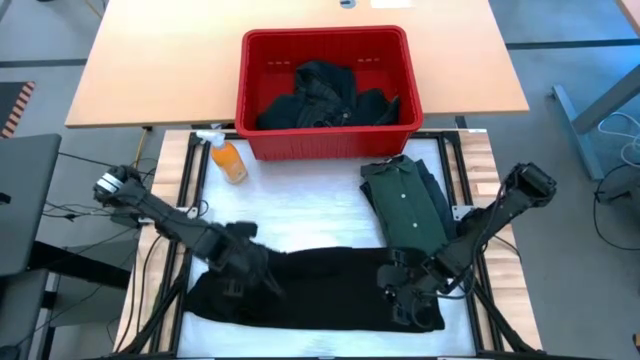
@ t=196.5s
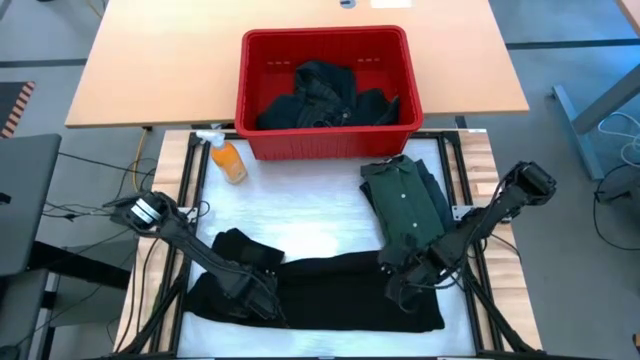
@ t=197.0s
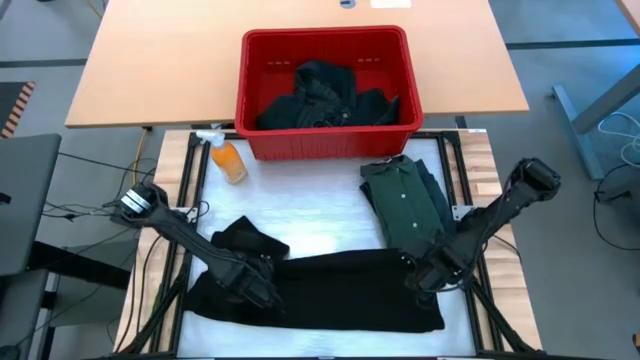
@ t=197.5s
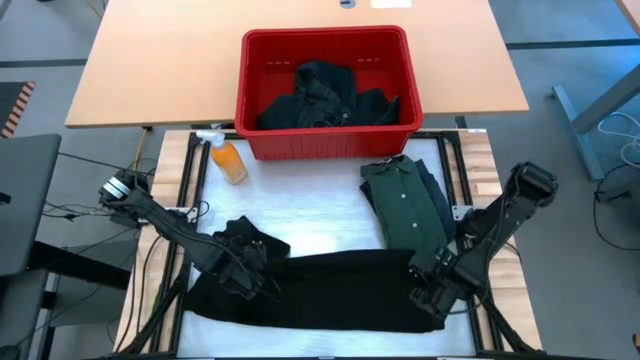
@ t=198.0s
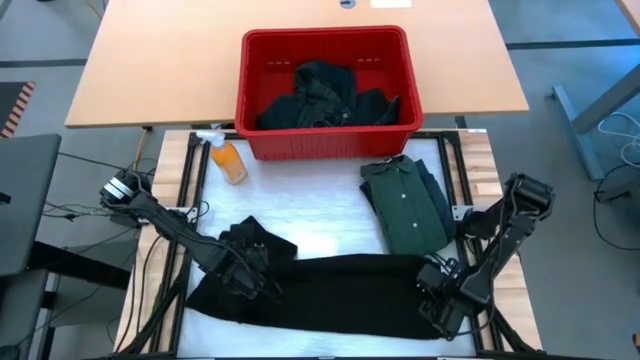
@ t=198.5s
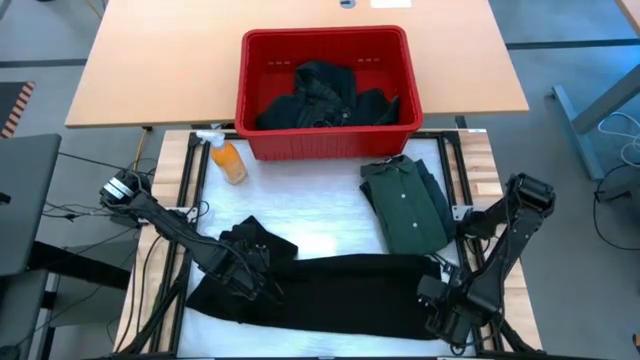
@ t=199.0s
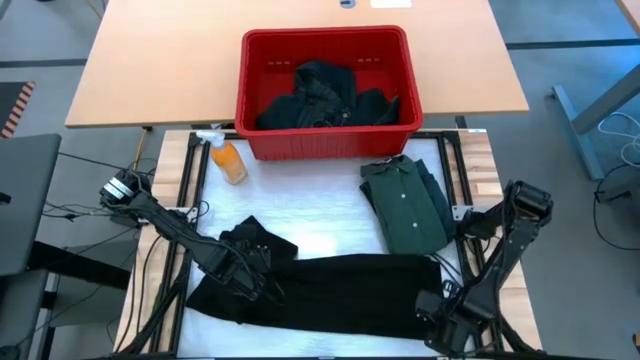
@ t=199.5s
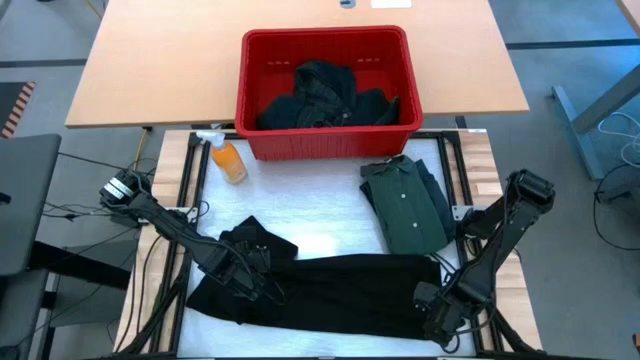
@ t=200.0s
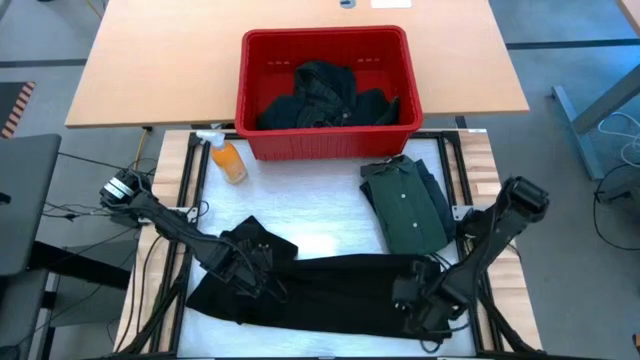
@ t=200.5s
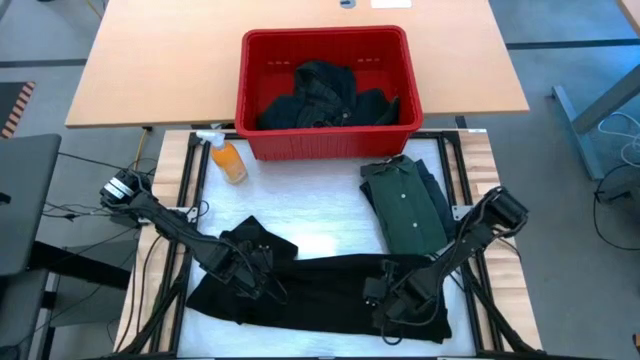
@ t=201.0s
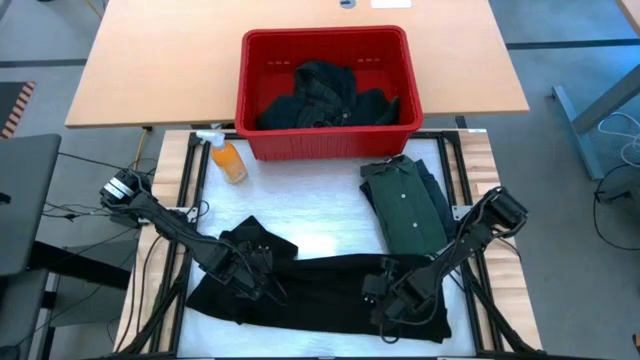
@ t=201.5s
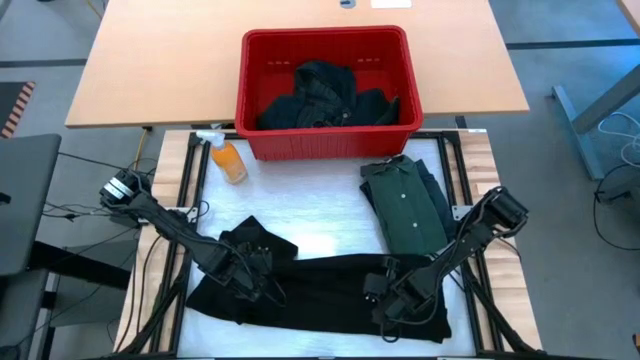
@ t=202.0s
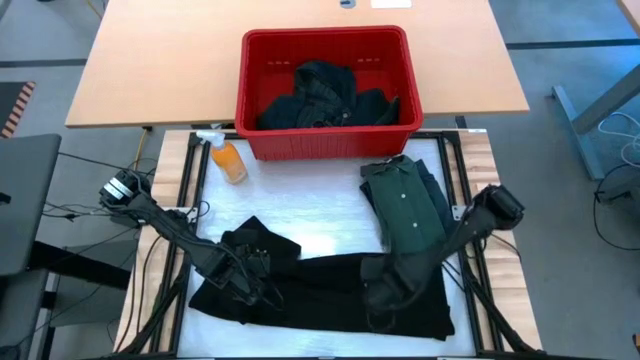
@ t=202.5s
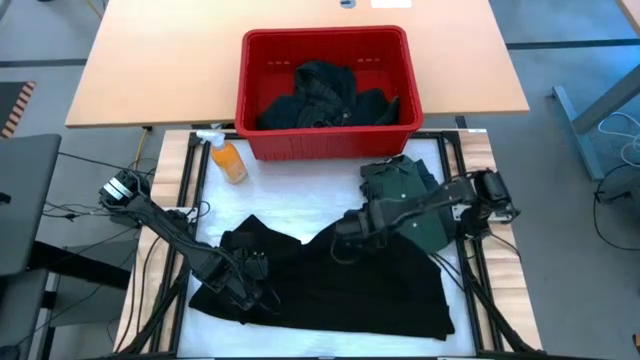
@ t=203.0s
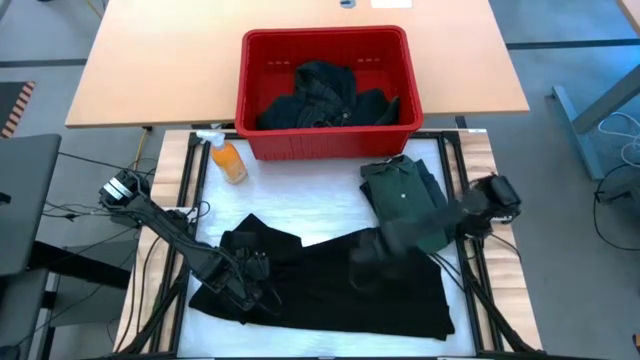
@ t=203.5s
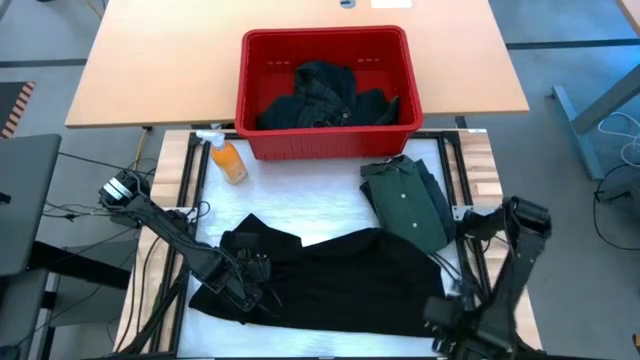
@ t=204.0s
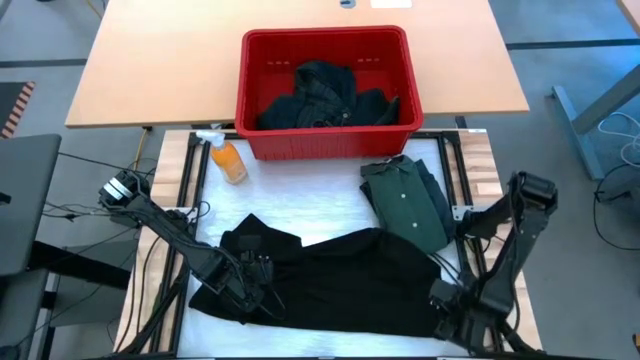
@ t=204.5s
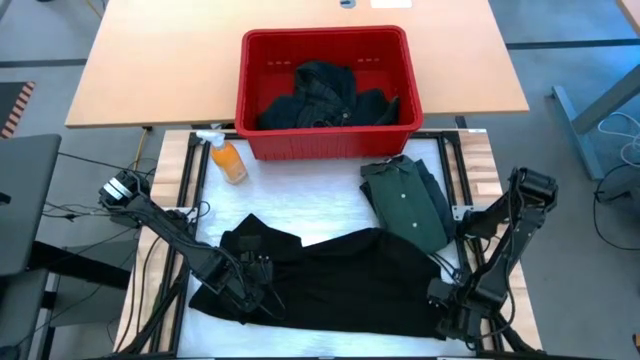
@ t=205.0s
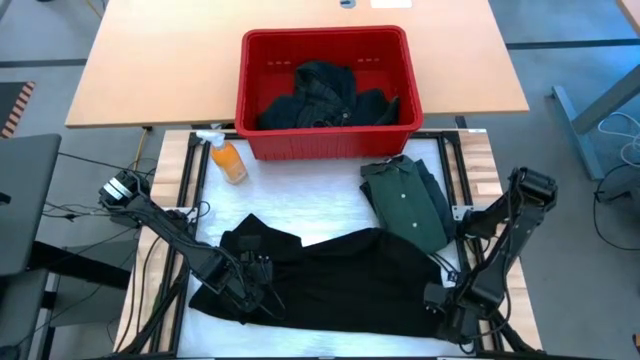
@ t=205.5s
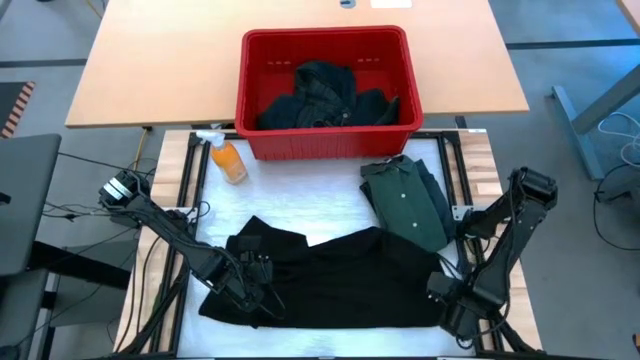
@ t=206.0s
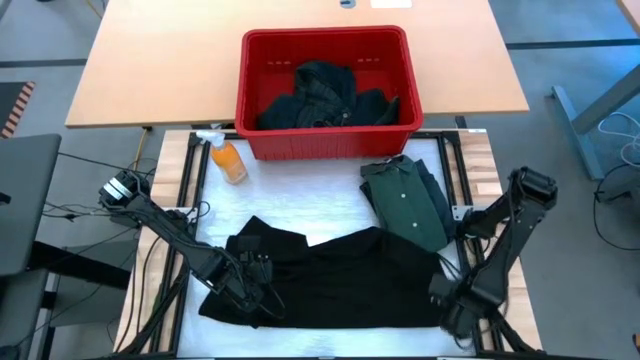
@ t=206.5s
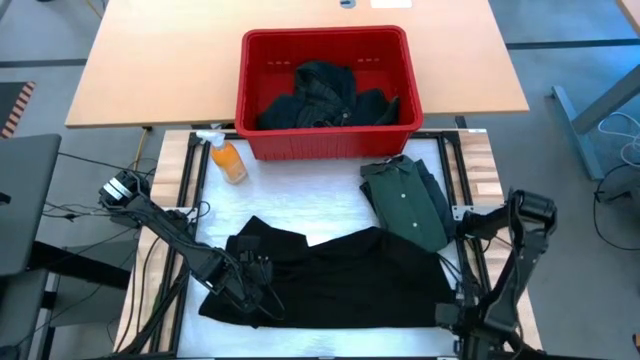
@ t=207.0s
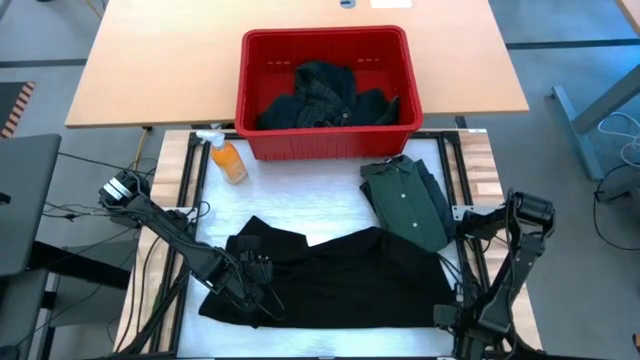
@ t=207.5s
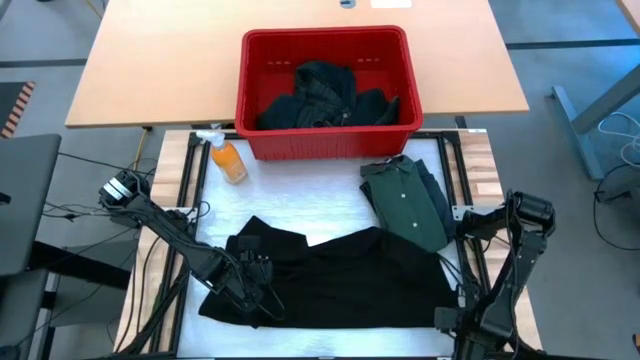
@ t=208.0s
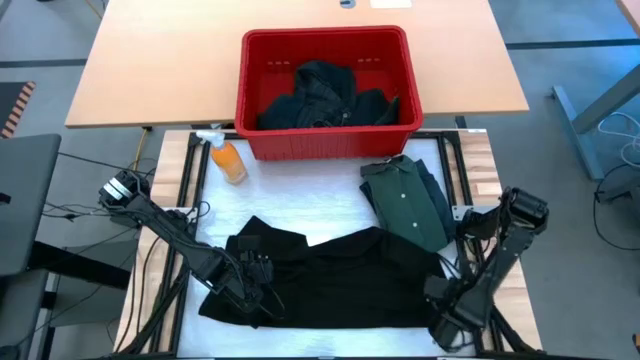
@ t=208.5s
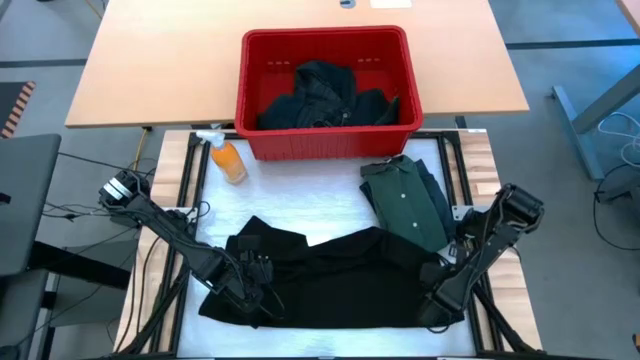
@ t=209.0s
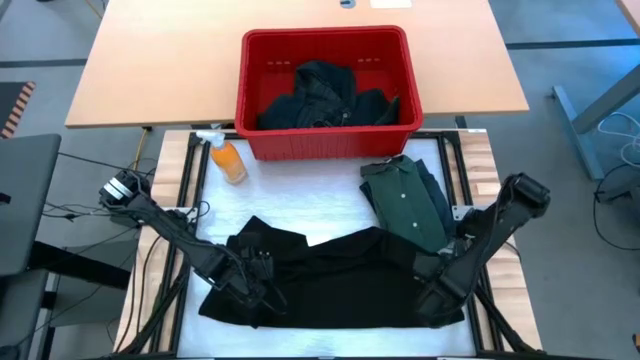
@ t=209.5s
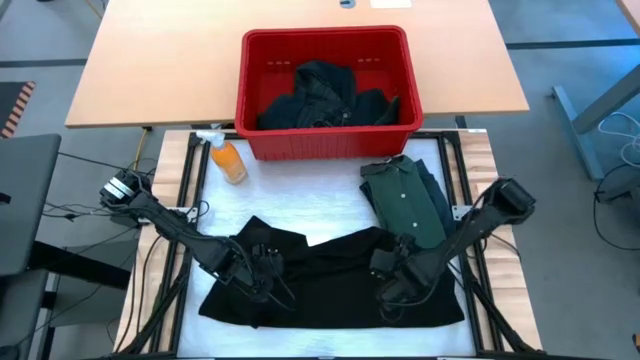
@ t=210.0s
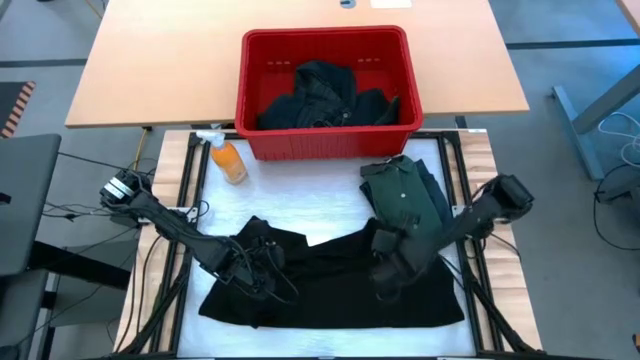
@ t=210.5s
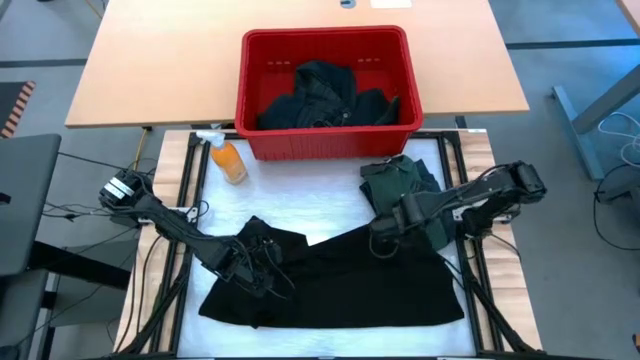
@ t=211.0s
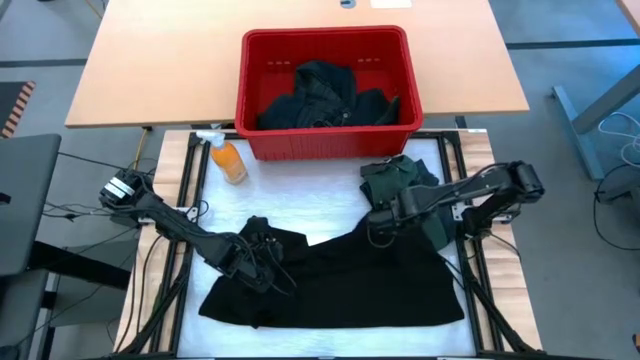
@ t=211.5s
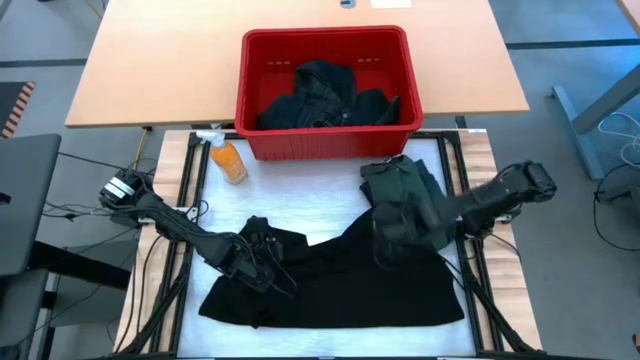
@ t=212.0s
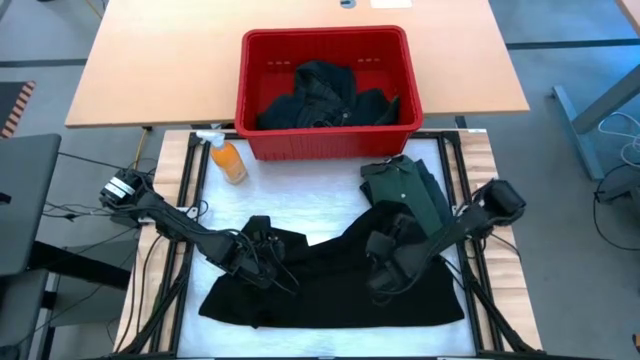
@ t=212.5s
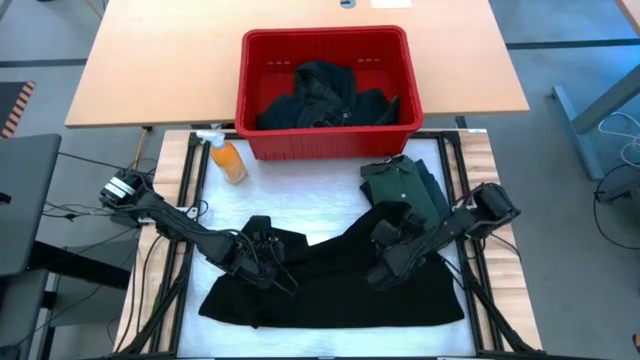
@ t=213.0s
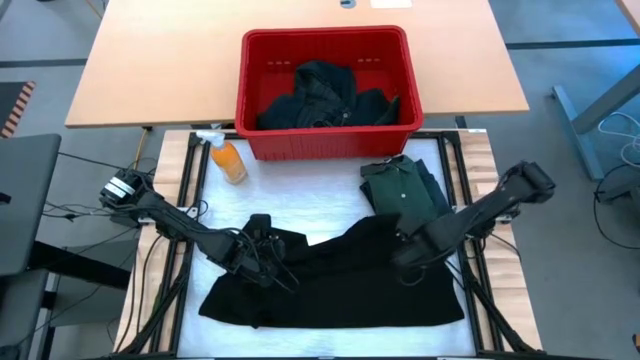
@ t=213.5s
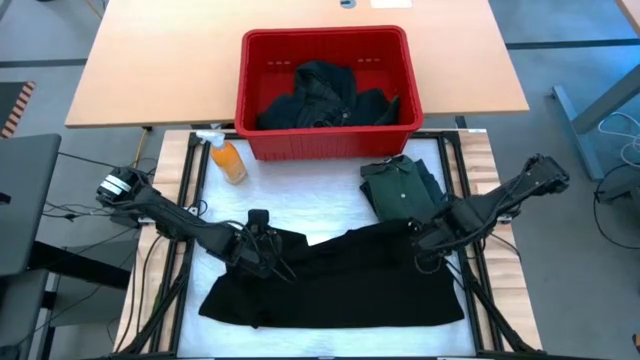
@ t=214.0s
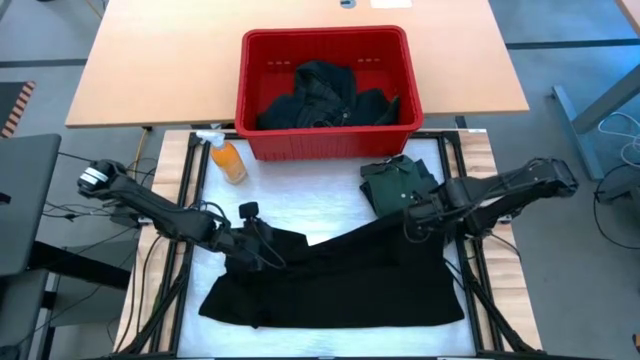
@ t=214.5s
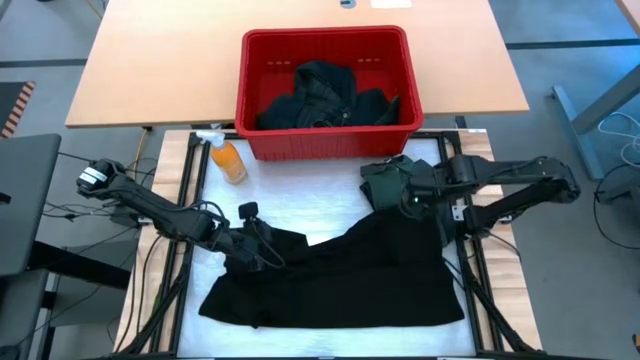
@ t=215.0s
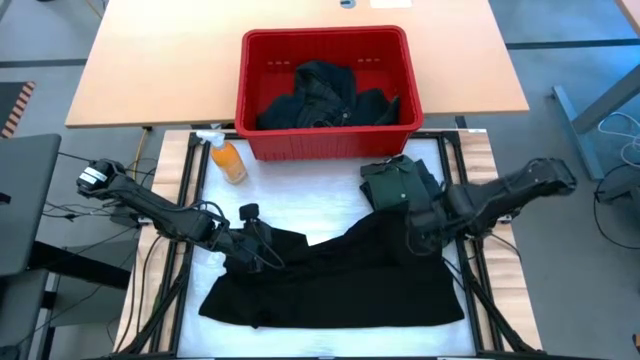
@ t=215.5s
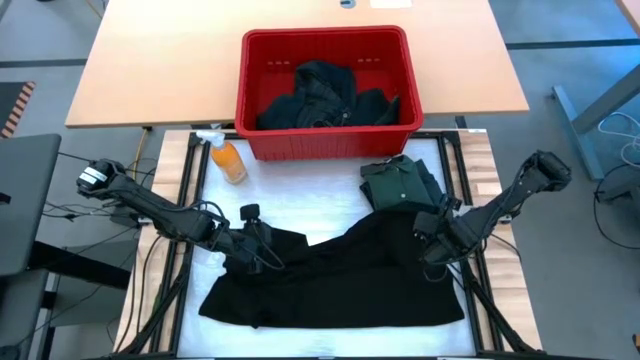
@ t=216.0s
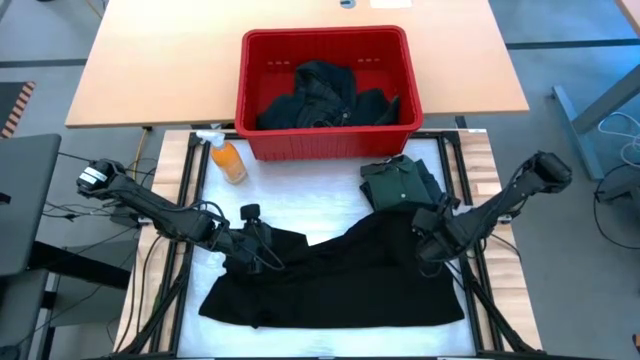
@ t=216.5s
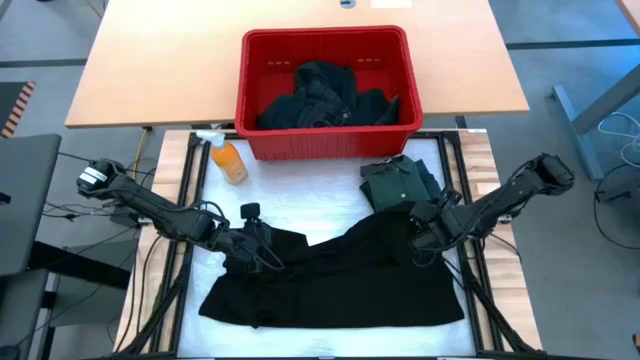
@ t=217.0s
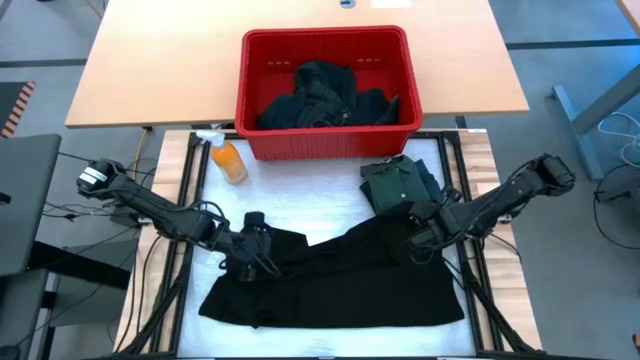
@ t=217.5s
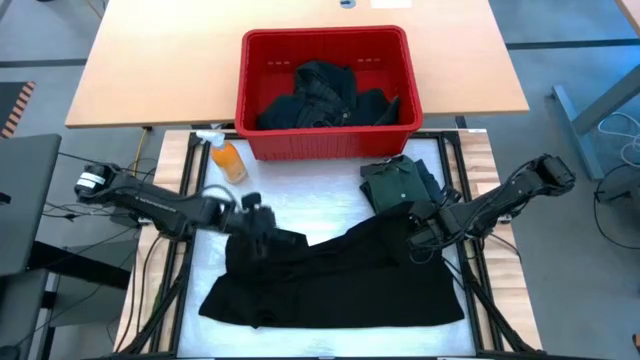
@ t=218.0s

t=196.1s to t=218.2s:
Task: Fold laundry
Fold the black shirt
